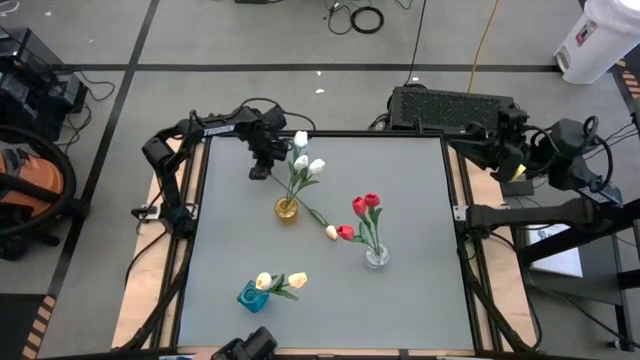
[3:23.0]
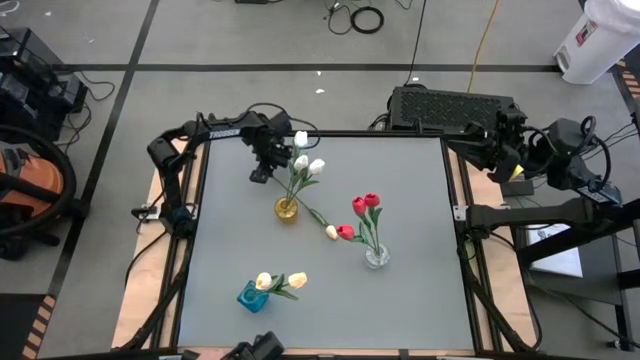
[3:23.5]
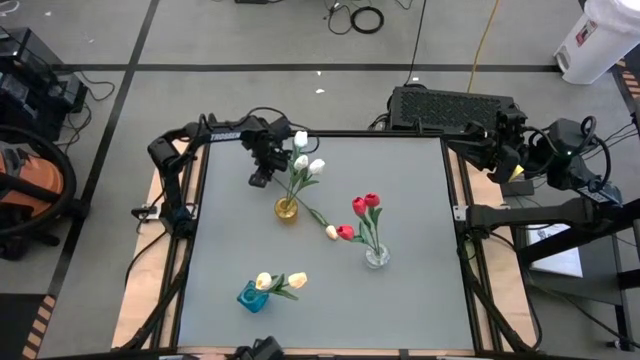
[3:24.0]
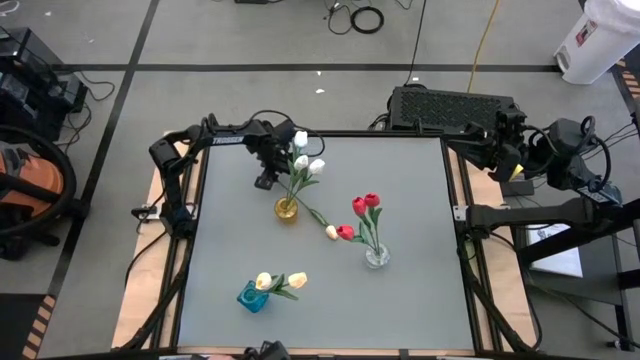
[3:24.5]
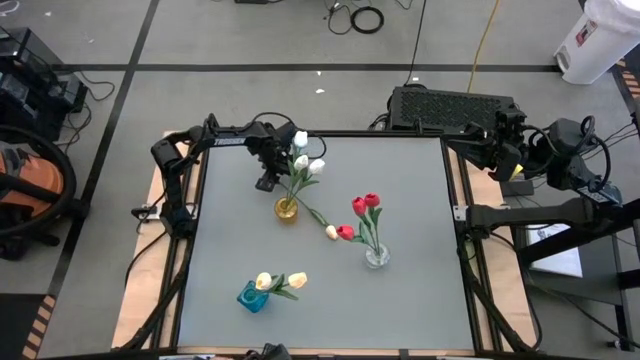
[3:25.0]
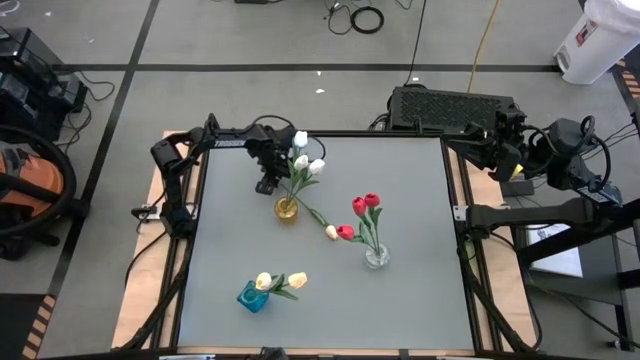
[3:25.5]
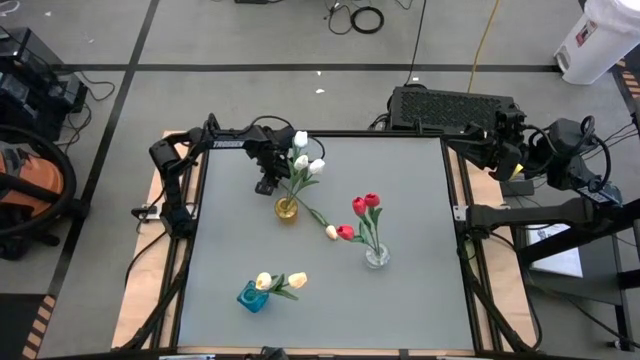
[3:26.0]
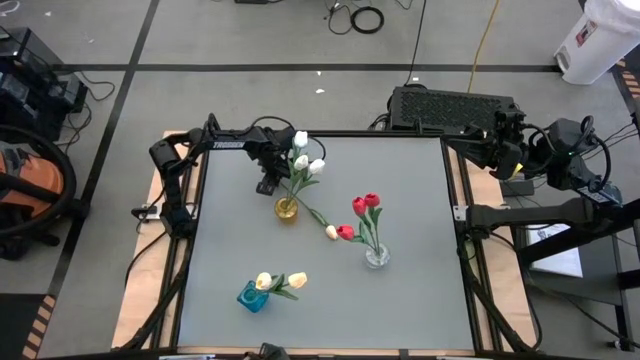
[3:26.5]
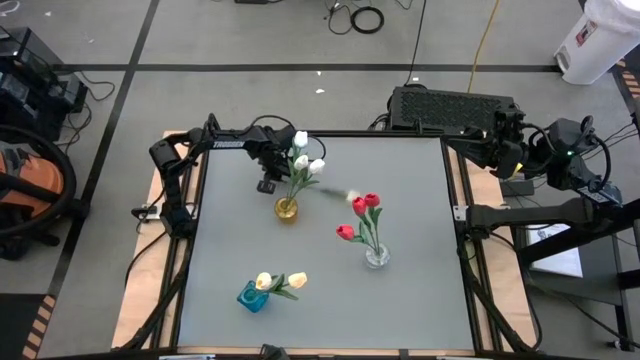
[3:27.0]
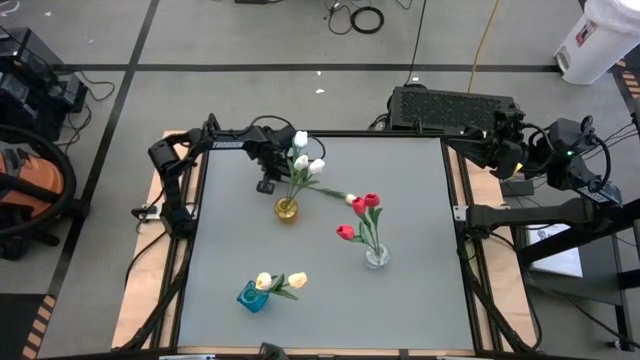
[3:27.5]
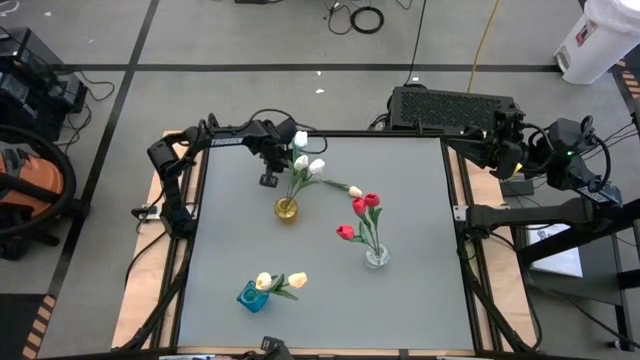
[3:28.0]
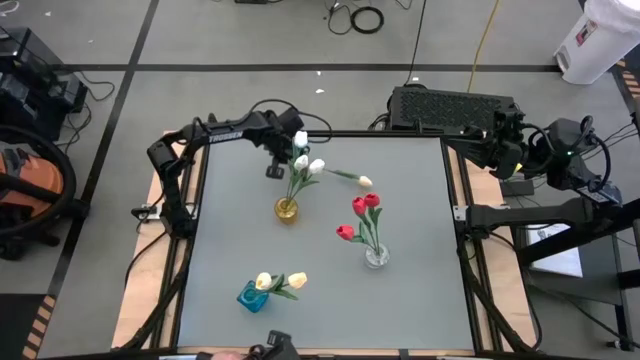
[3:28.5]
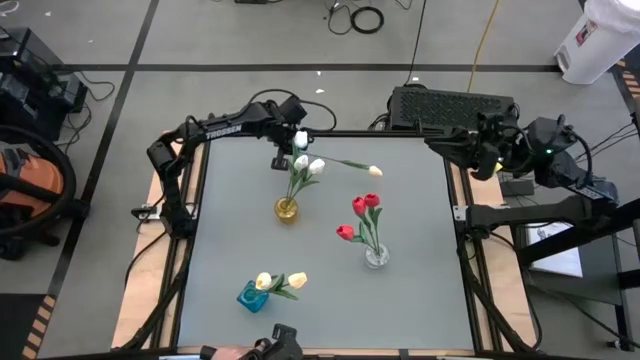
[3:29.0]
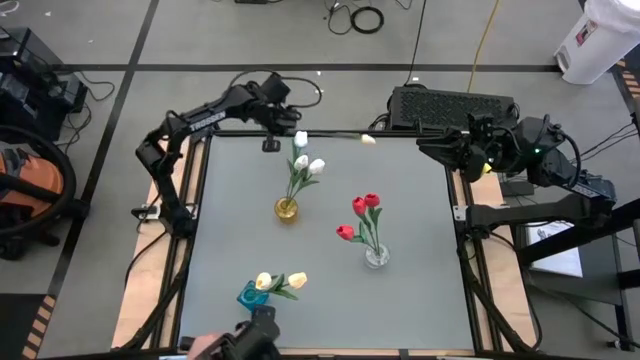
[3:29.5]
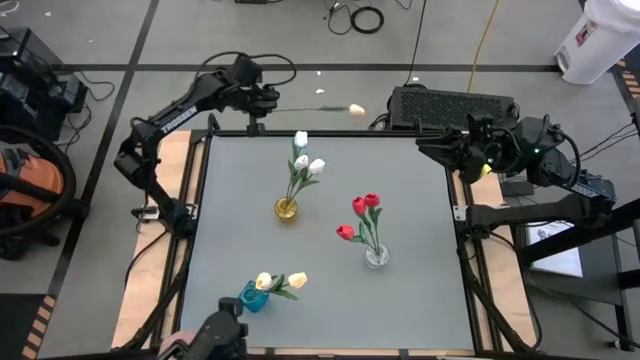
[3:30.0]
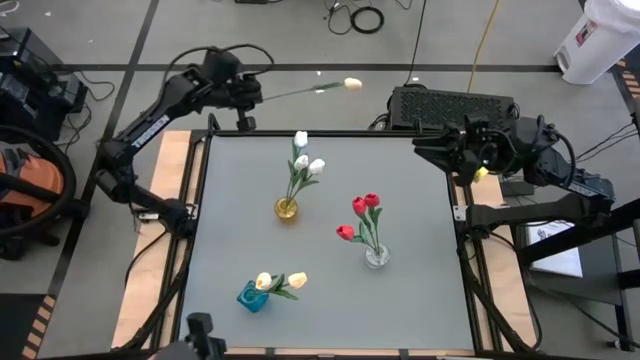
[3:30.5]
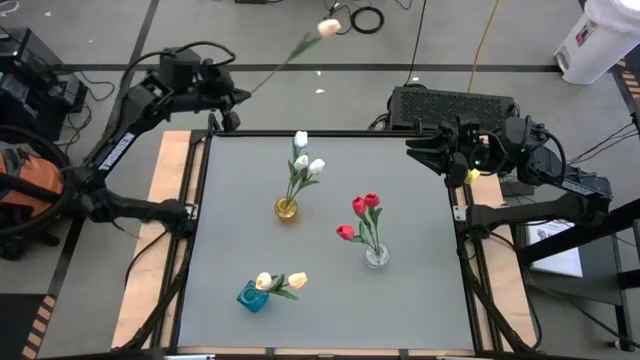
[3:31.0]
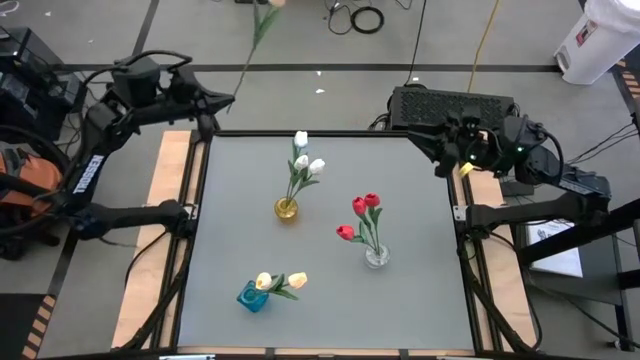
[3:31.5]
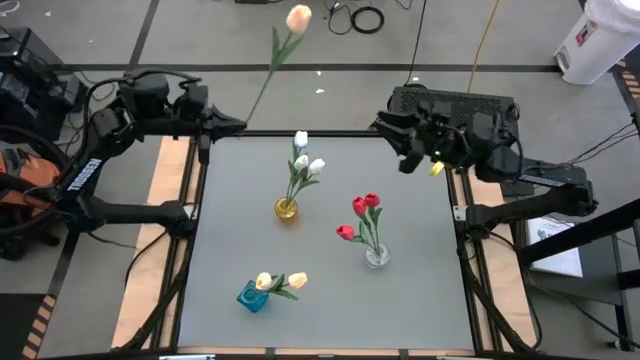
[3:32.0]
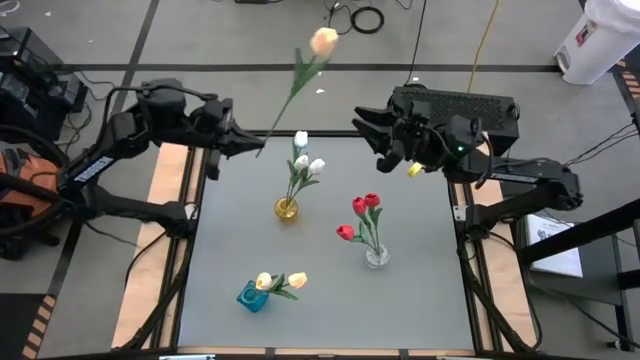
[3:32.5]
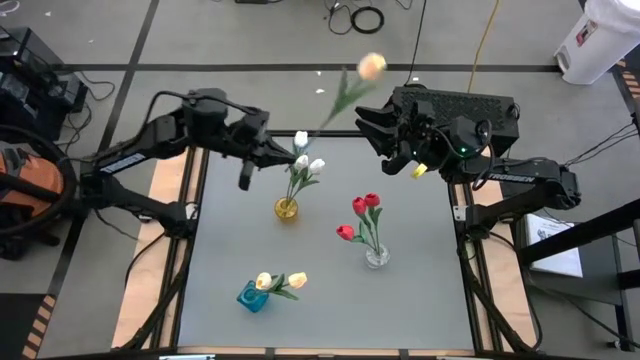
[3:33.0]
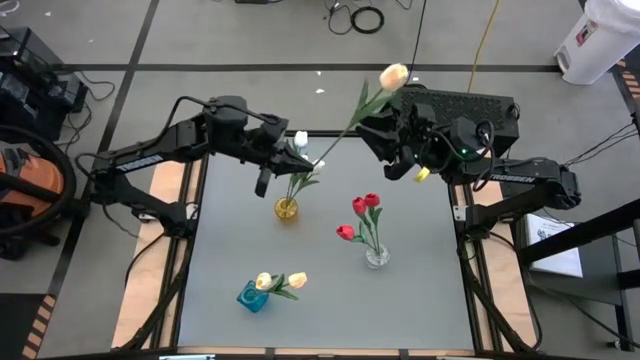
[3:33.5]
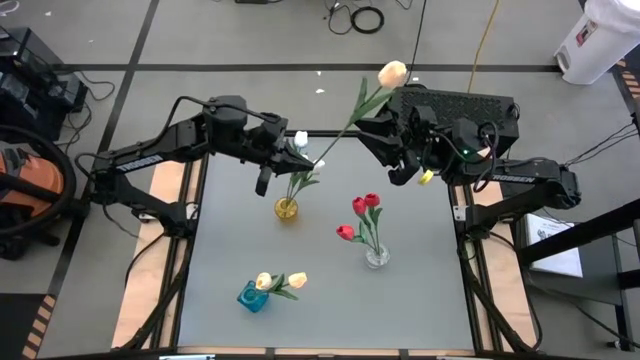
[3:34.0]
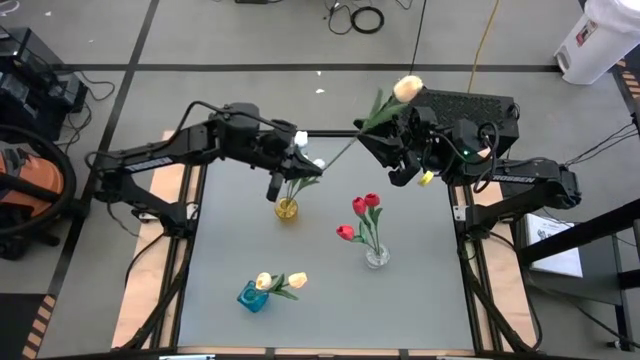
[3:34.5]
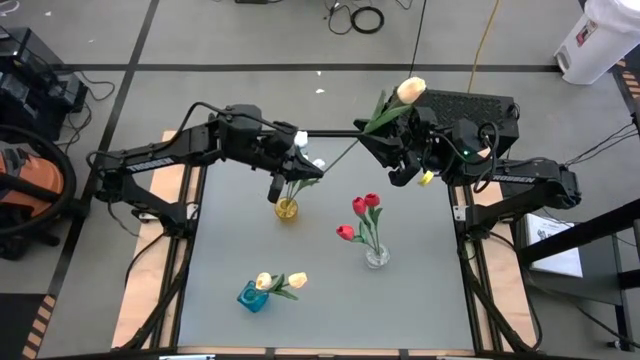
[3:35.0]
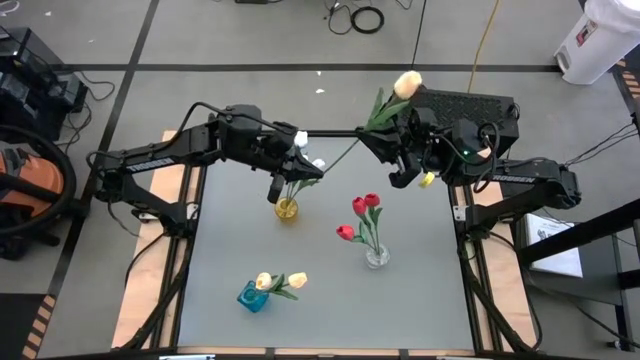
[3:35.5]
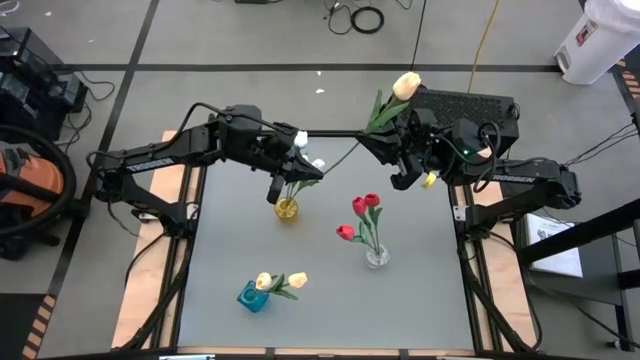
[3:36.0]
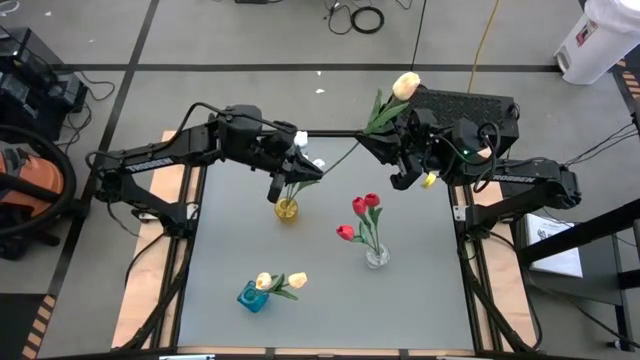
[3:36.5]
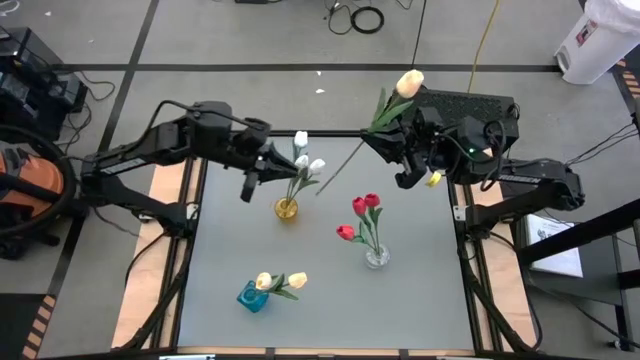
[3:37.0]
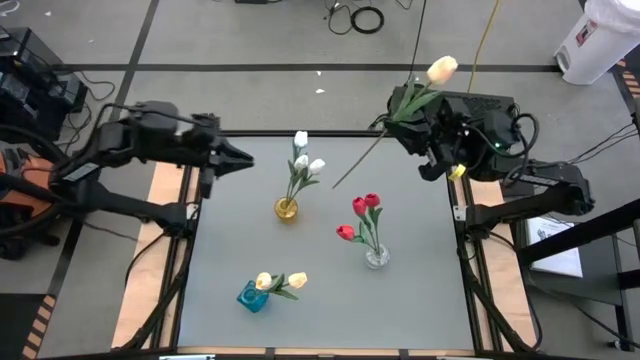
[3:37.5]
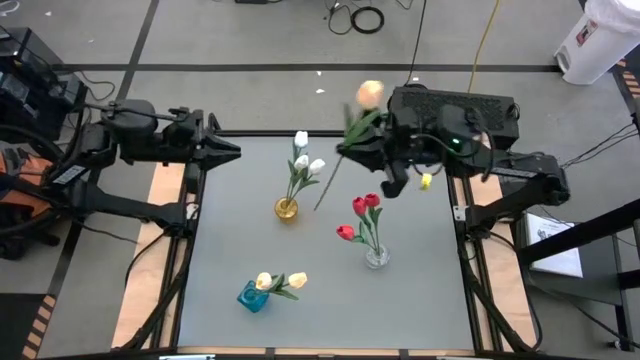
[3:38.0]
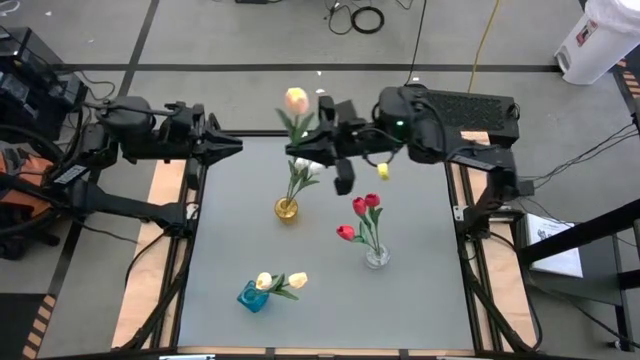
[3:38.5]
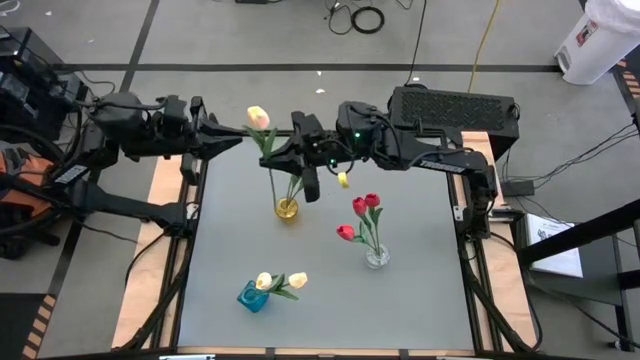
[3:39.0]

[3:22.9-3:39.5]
Task: Sort flowers into vase by color
Put the yellow tulip into the blue vase
